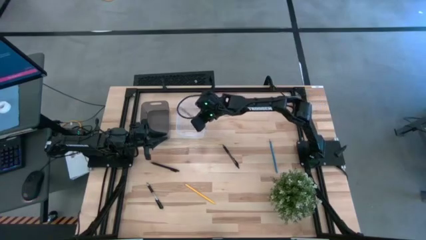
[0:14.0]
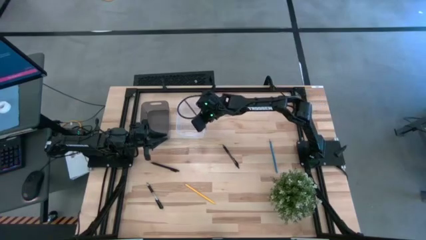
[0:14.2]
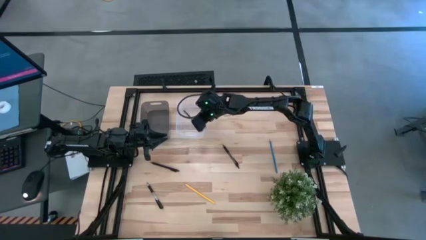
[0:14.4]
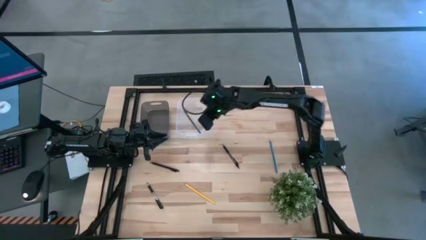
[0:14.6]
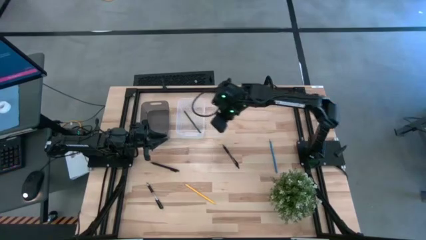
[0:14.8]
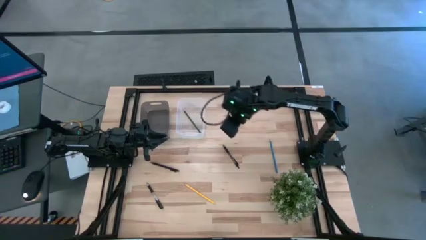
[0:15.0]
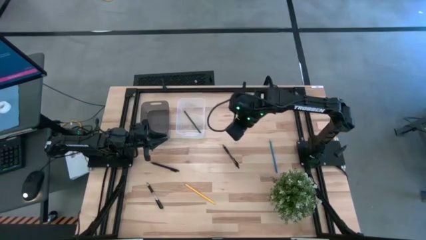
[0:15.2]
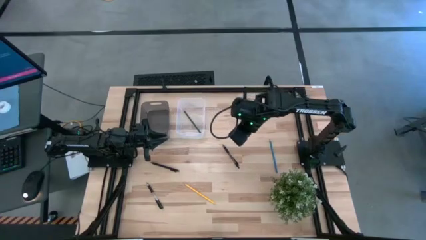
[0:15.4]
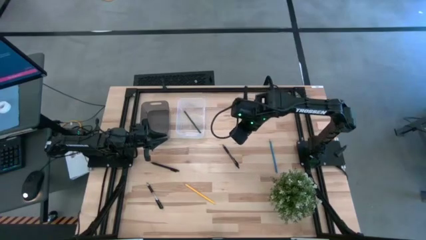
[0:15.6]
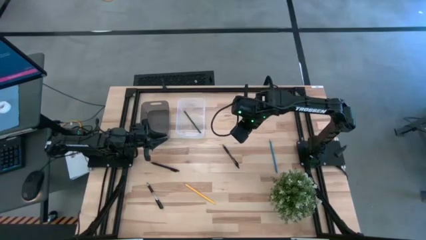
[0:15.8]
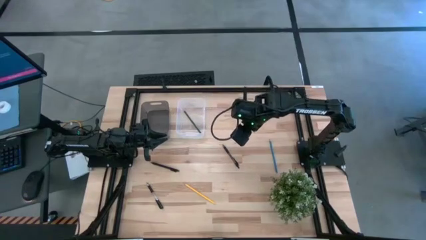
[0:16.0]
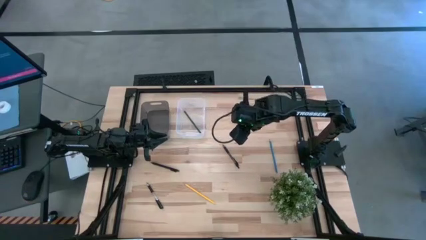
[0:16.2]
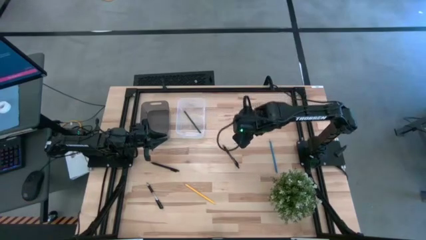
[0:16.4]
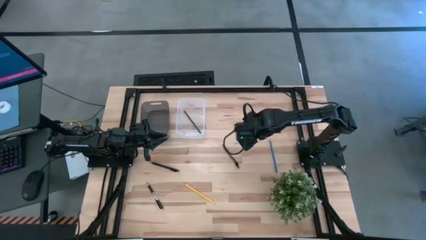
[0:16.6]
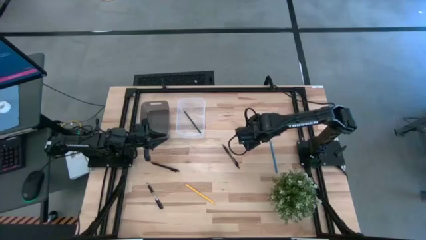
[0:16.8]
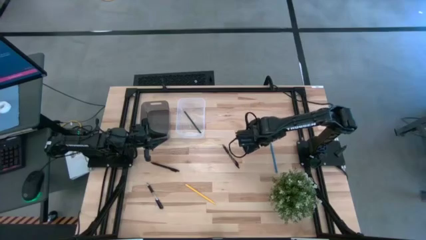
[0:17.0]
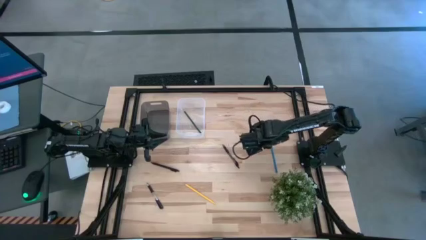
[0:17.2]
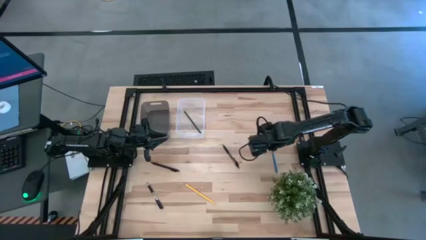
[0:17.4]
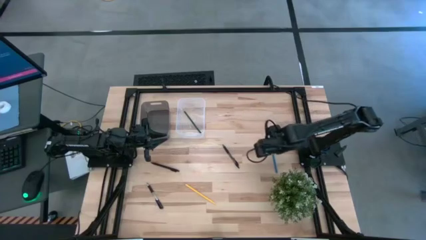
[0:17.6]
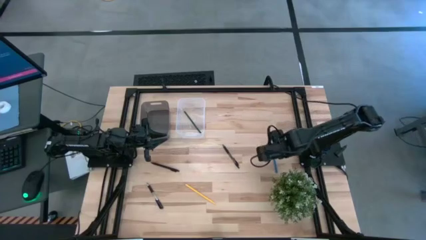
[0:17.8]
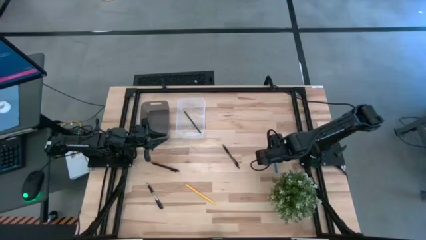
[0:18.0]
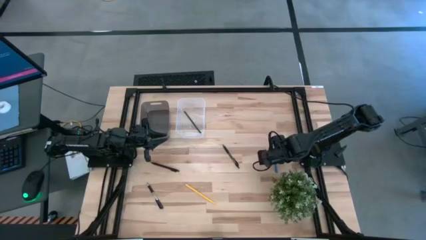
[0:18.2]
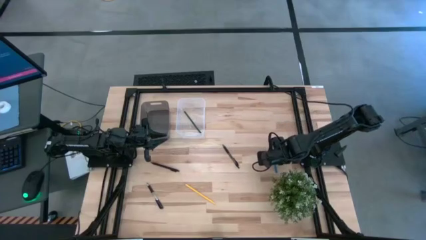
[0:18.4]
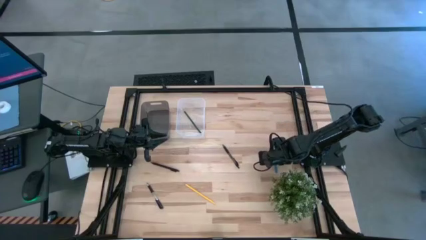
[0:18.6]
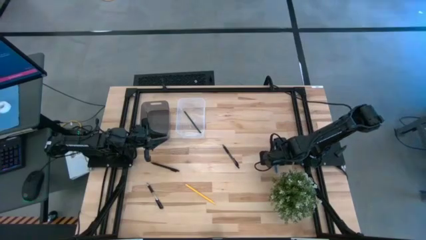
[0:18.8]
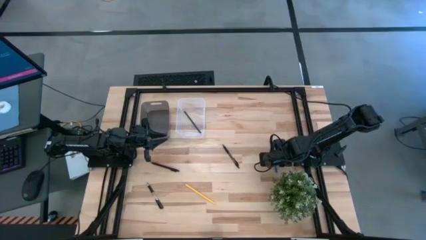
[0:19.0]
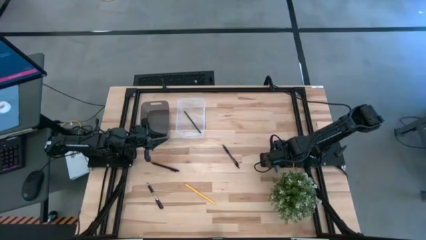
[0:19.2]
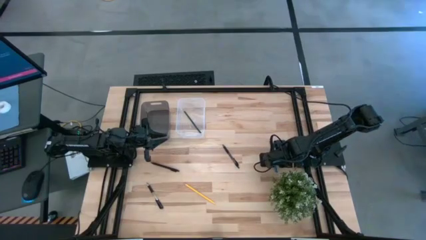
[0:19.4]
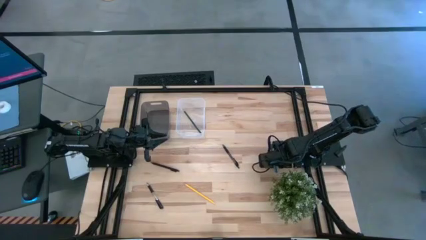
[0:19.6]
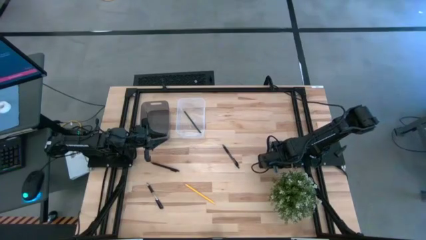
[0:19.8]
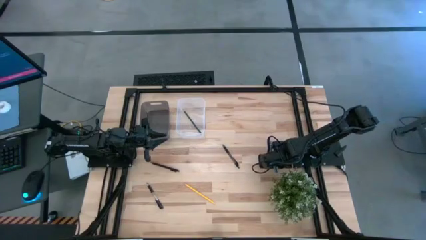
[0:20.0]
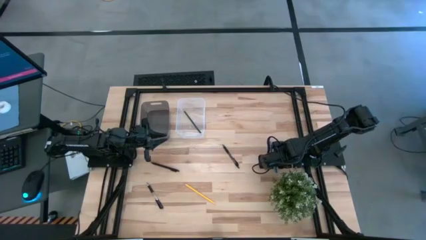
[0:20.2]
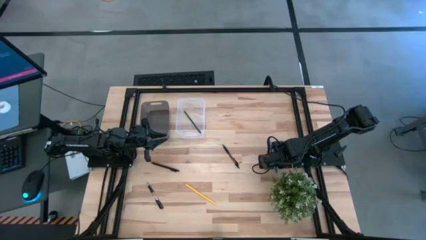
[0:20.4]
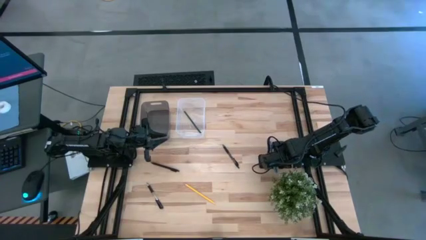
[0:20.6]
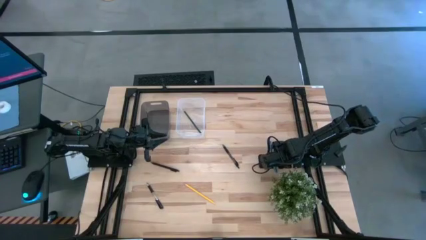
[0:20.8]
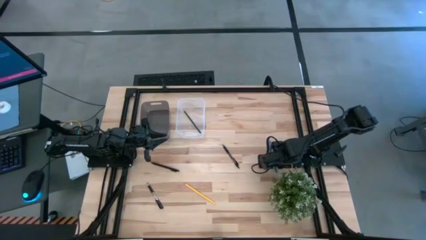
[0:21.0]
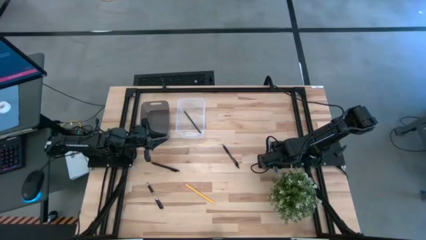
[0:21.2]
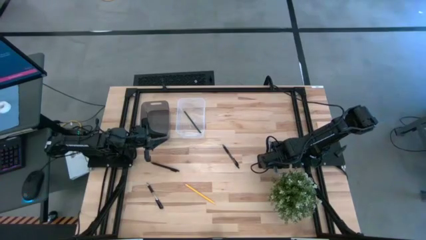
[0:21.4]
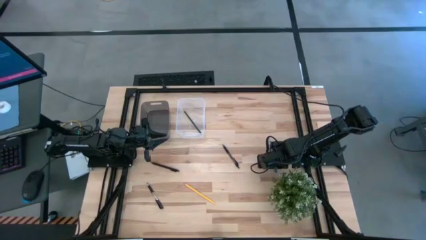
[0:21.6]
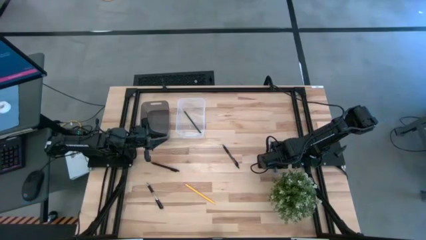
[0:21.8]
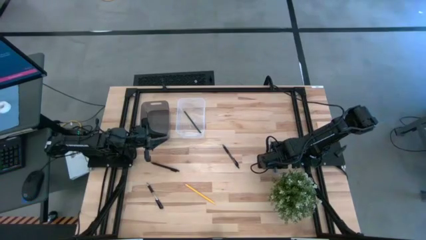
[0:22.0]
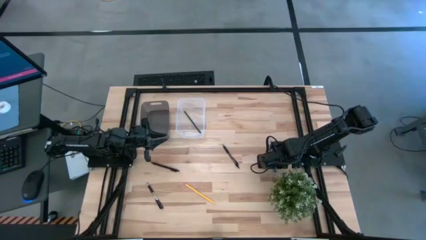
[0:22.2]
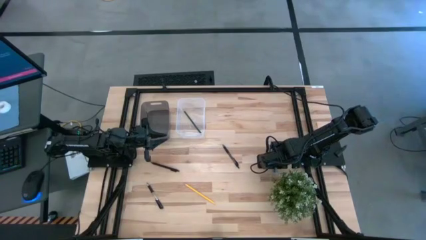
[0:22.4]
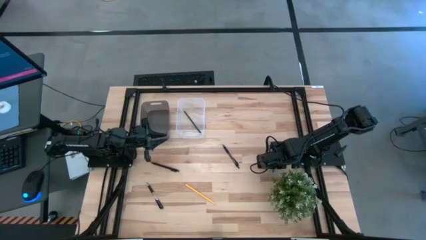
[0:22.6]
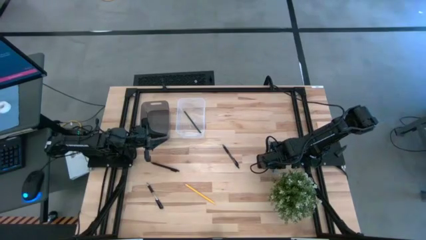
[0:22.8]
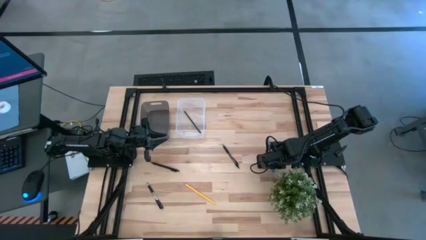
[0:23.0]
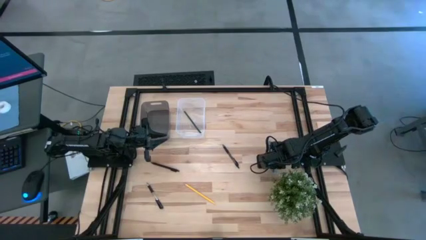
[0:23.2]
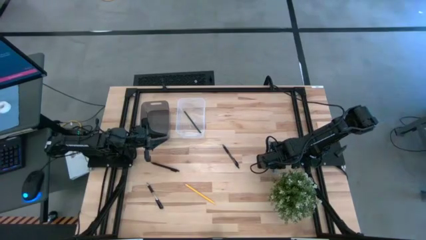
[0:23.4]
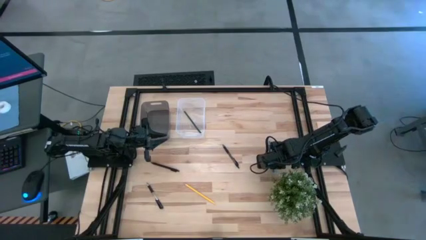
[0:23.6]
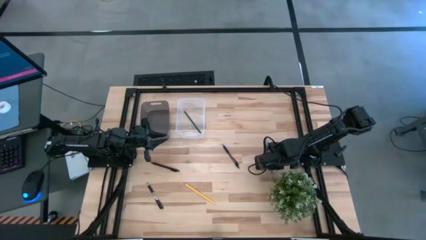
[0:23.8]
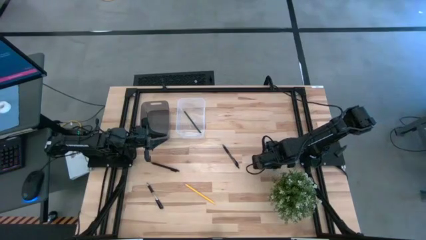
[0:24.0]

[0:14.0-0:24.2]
Task: Sort pens & pencils
Put the blue pencil into the transparent bin
